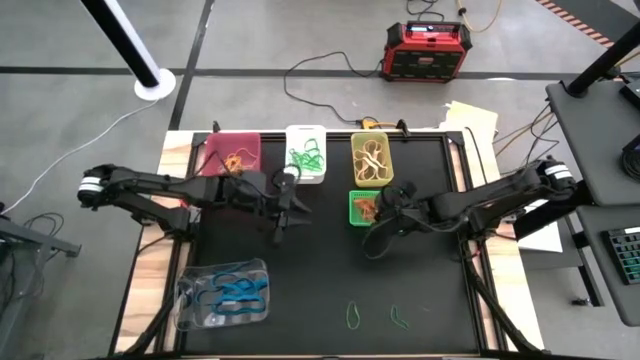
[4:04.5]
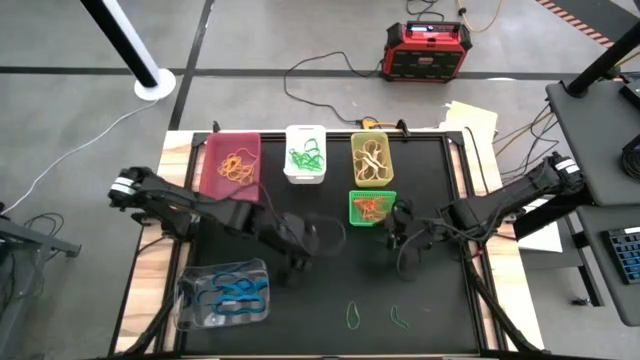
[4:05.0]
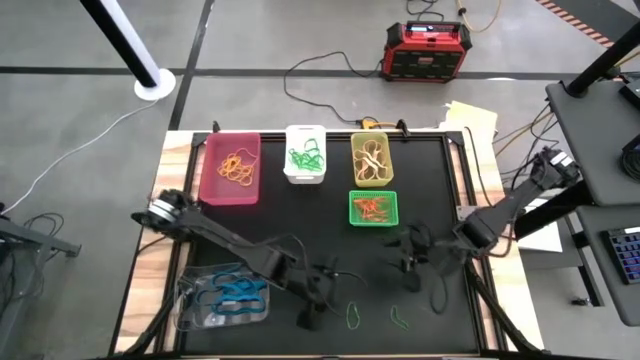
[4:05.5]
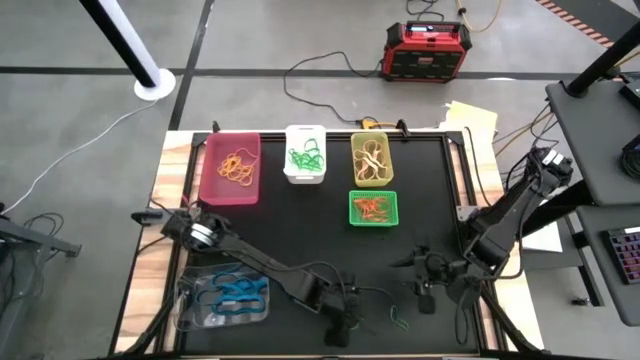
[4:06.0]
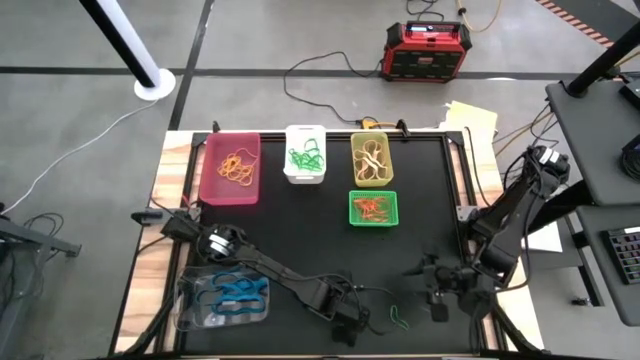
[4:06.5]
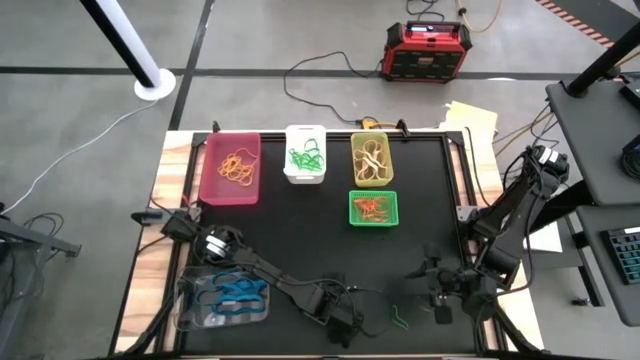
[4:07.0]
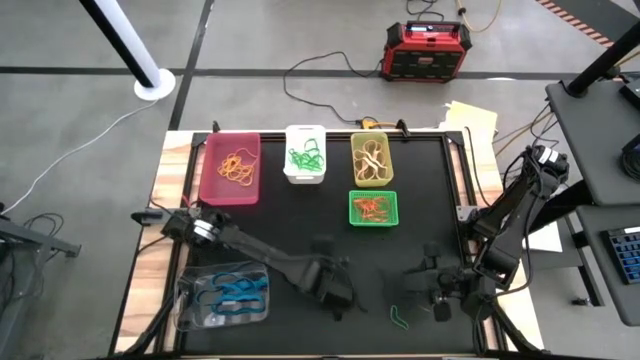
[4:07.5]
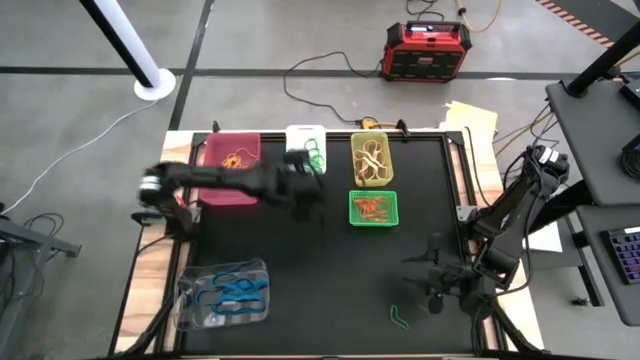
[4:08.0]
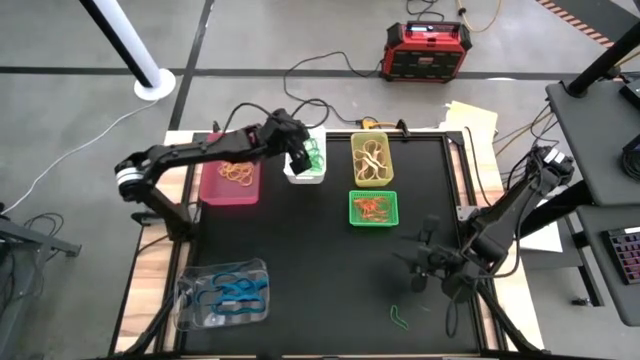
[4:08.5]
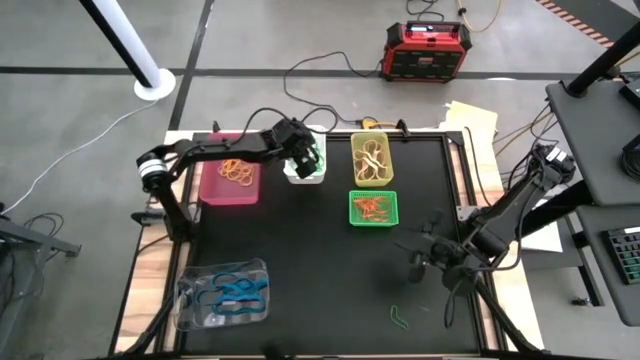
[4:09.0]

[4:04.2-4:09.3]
Task: Sort rubber bands into baskets
Put the green rubber band into the white bin

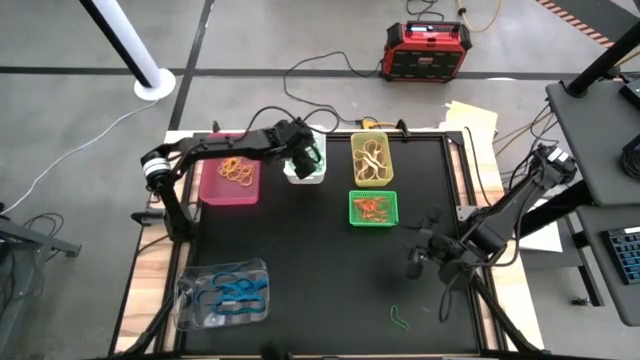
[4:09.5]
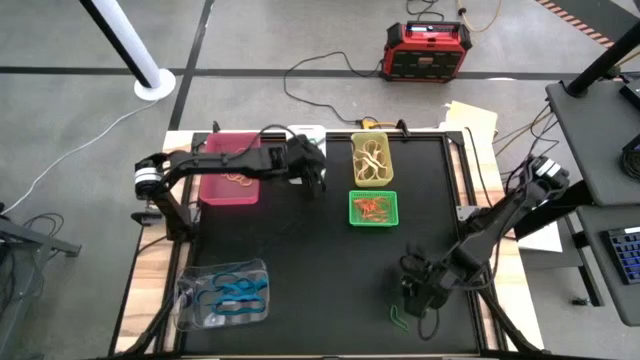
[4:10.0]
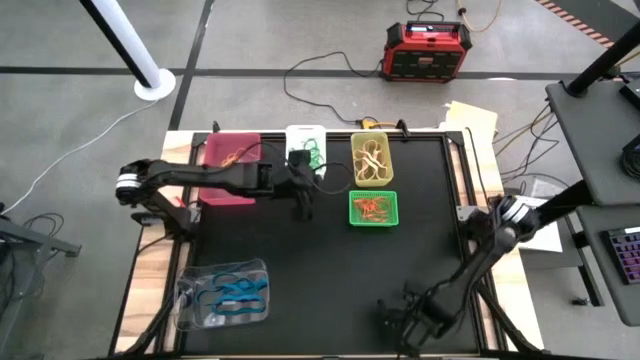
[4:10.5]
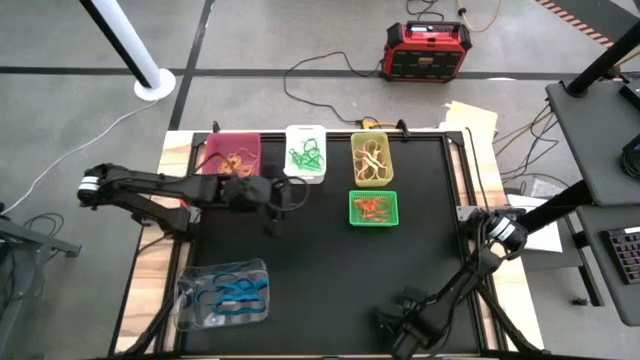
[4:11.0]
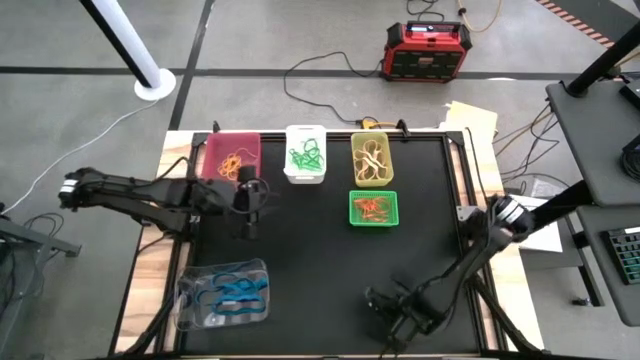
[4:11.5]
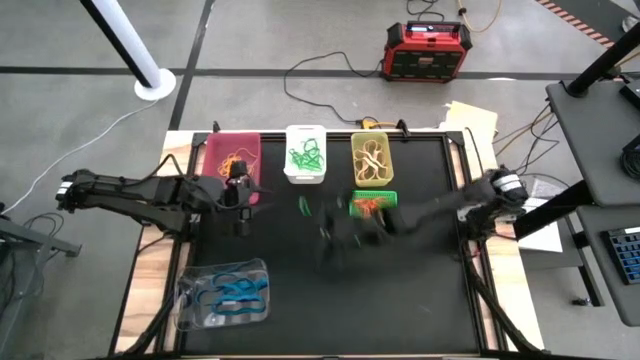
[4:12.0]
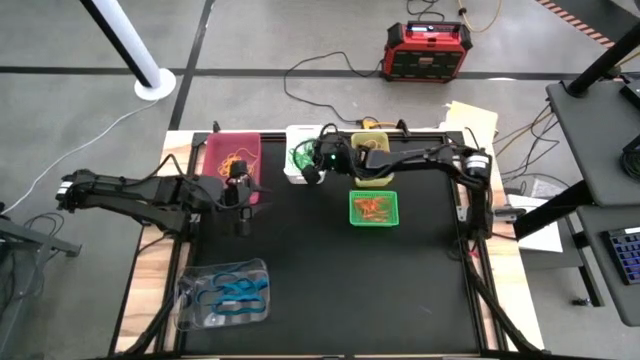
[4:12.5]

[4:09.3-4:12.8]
Put the green rubber band into the white bin

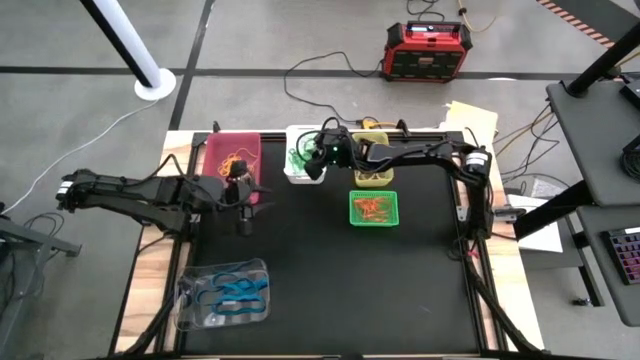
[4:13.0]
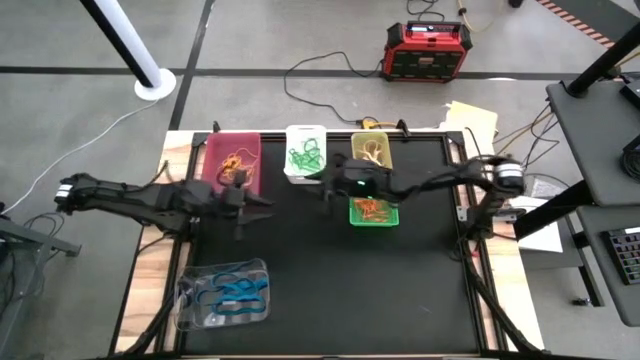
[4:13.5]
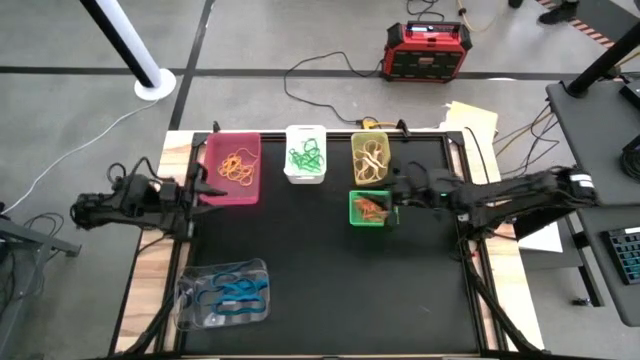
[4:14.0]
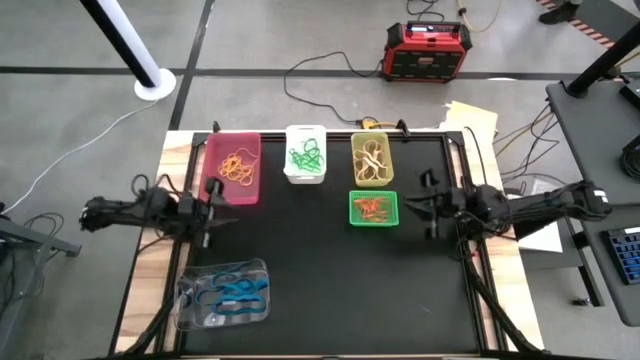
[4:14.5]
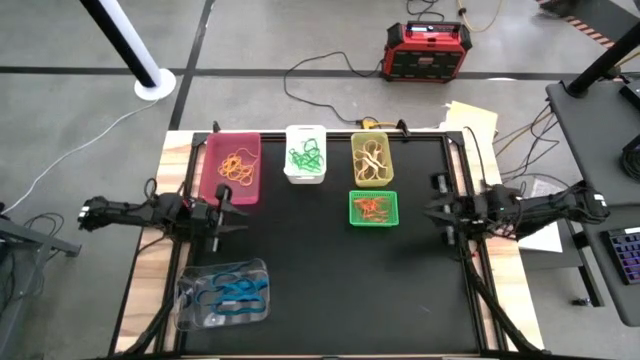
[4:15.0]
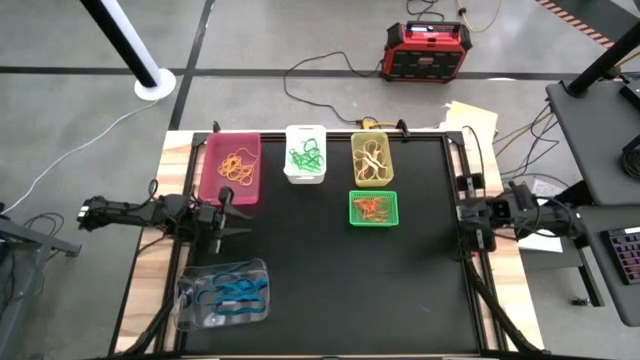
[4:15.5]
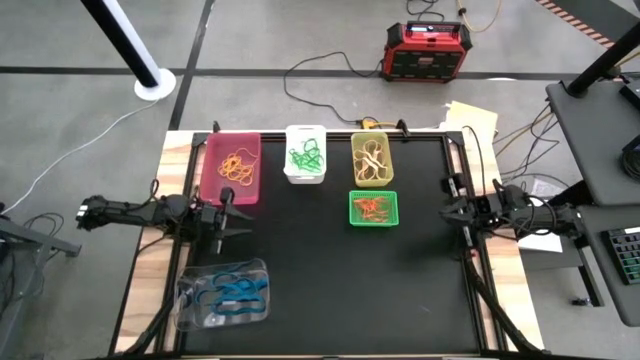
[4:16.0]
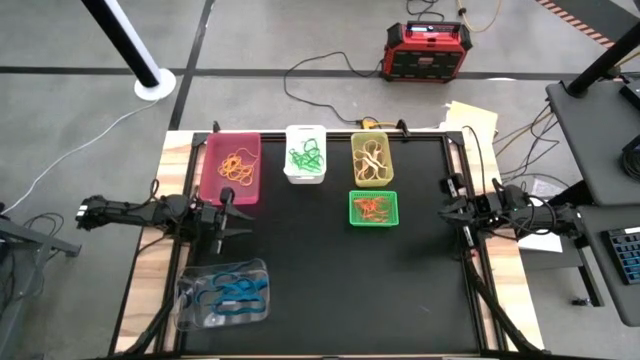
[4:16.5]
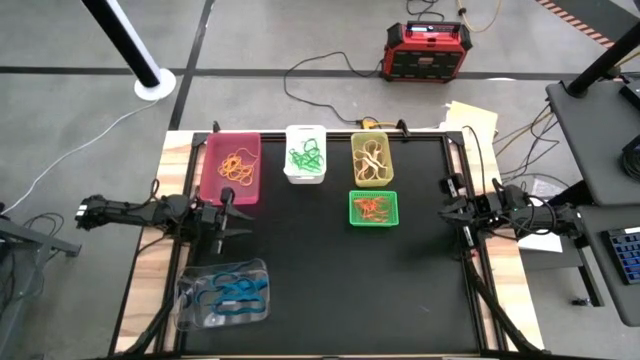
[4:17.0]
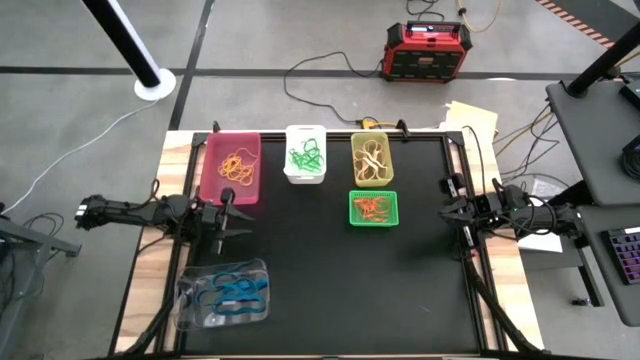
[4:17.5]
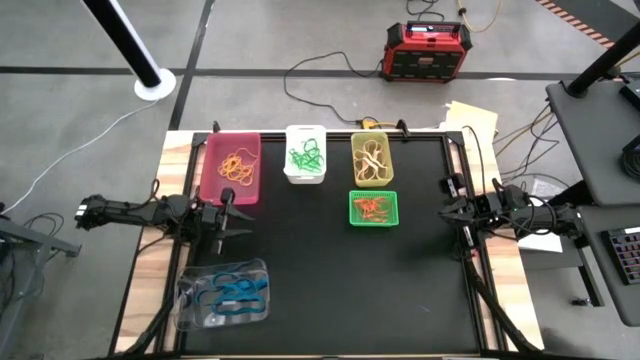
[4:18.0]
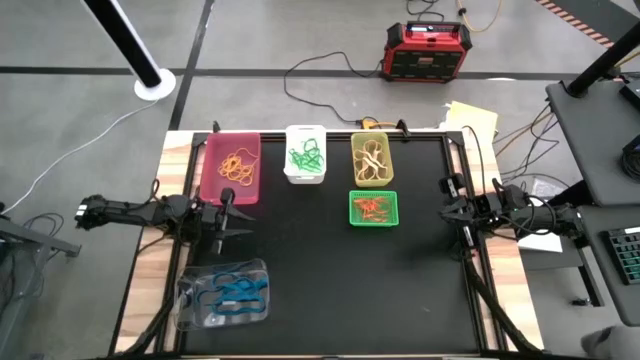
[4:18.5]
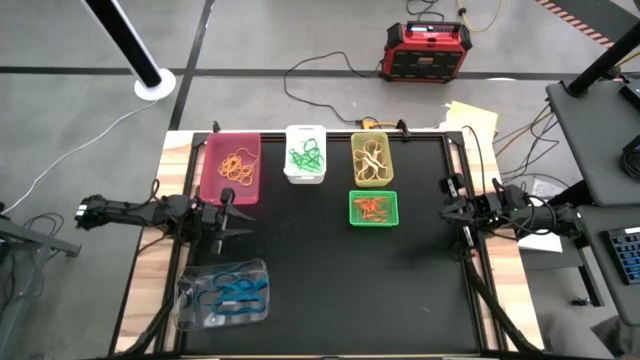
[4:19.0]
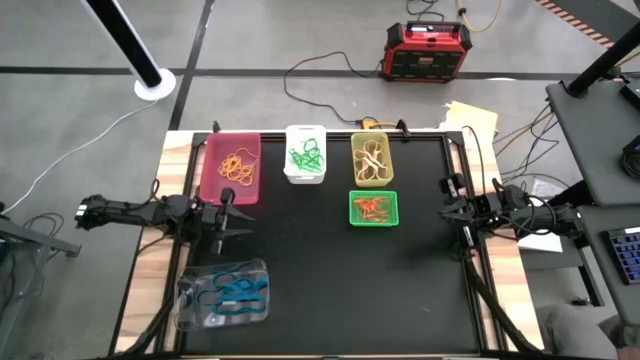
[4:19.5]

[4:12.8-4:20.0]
Return to Home Position

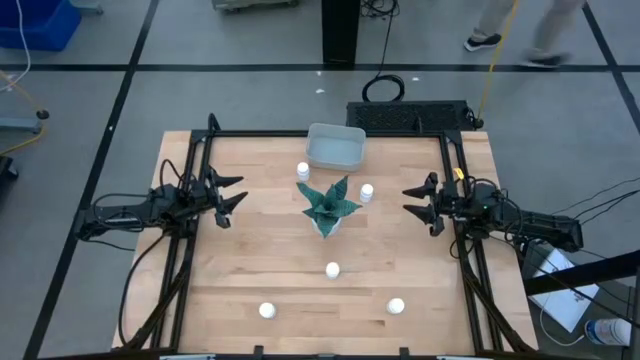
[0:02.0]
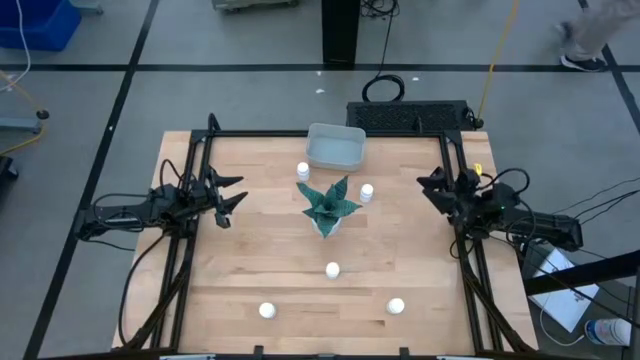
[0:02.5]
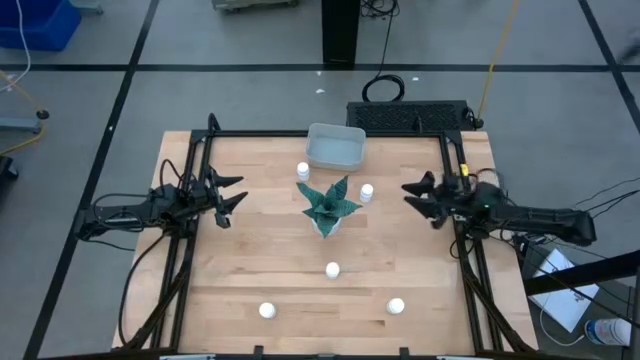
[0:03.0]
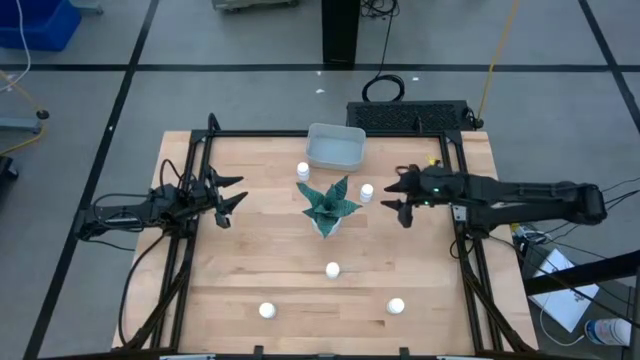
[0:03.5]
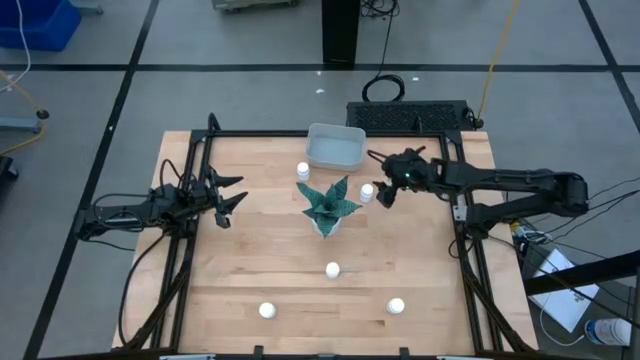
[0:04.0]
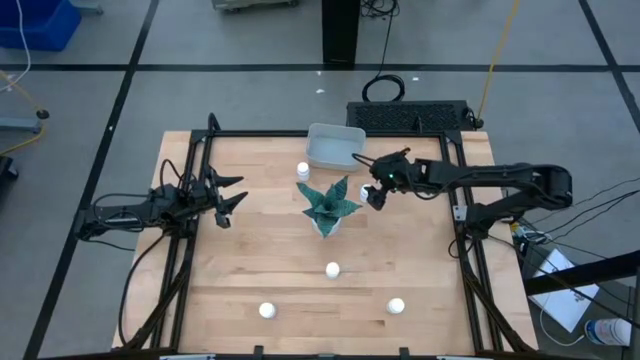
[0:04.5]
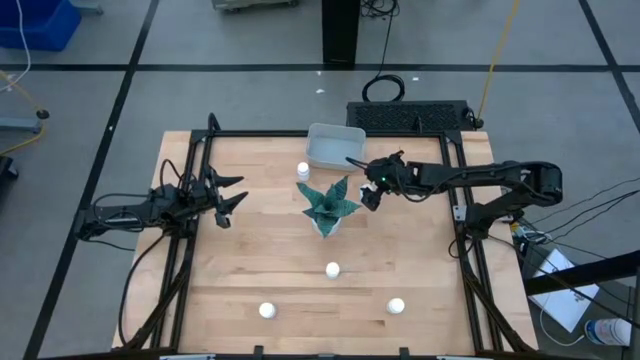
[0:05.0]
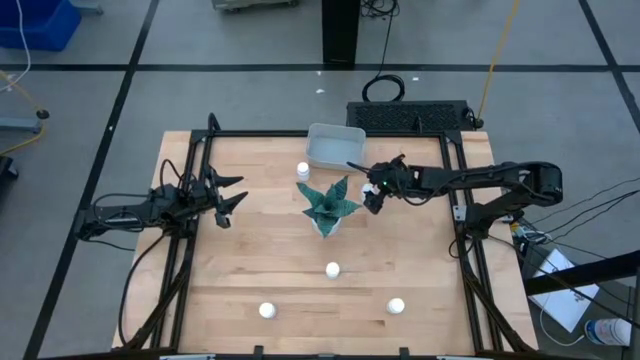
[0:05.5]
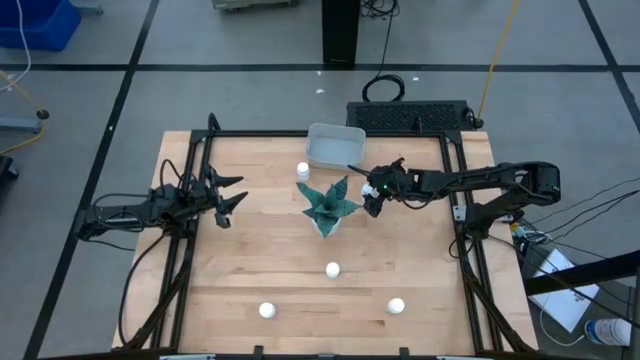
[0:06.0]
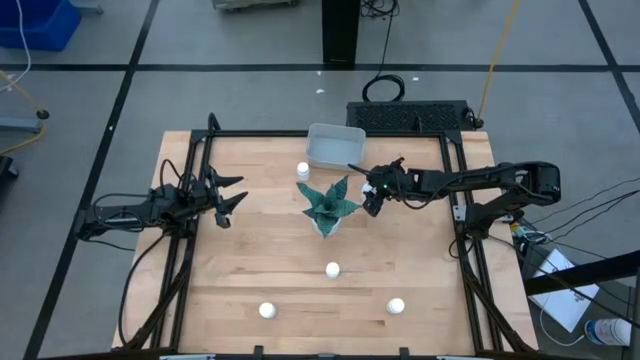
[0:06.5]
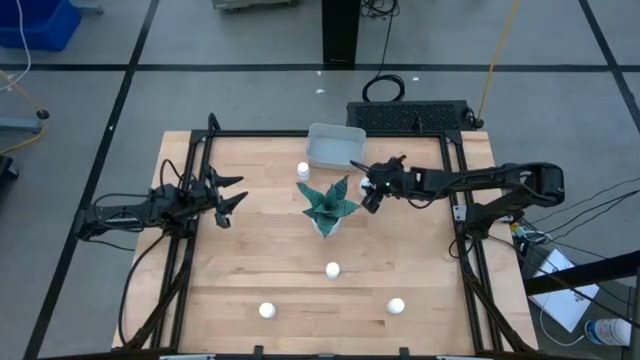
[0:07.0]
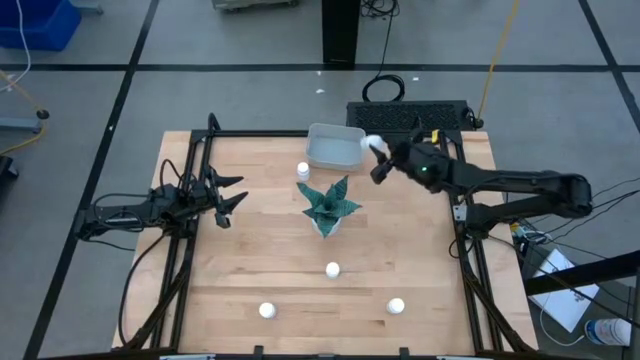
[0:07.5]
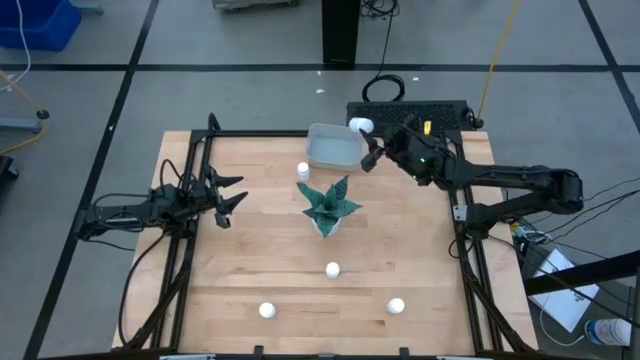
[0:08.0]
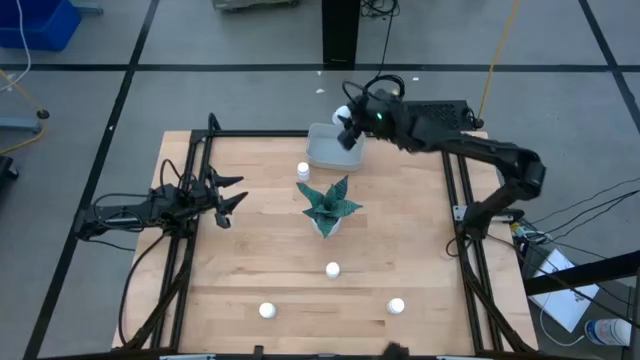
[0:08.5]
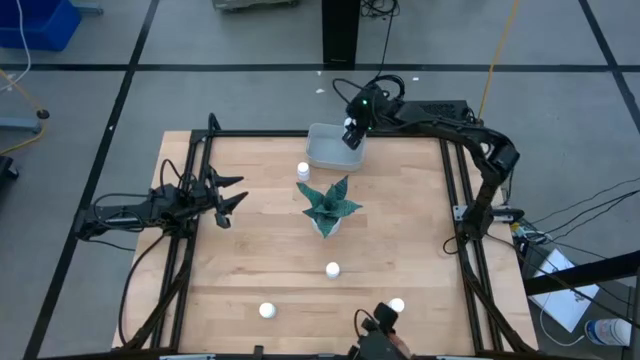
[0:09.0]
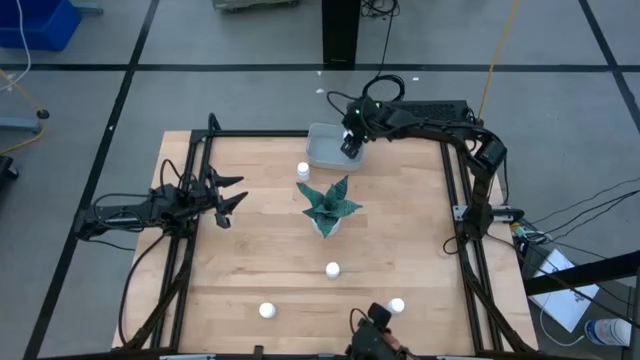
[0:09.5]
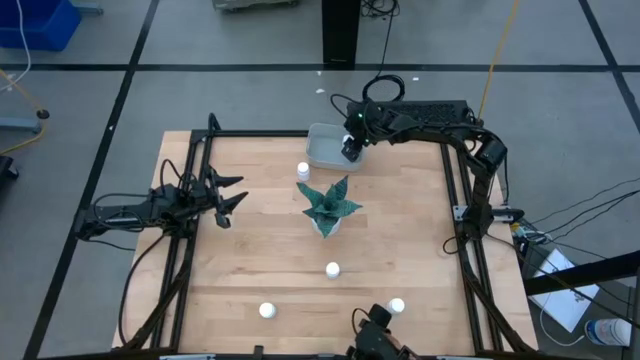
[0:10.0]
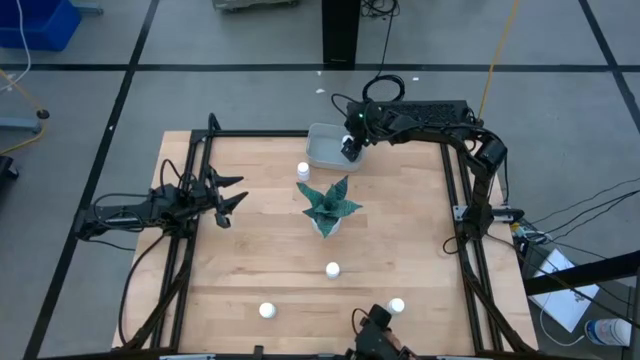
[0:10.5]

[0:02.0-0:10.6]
Task: Pick and place pill bottles into a basket
Put the white medicine bottle into the gray bin
